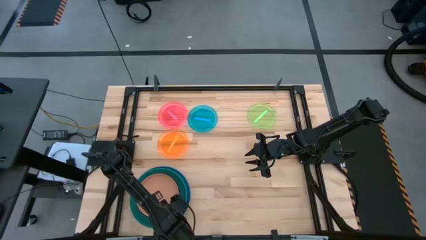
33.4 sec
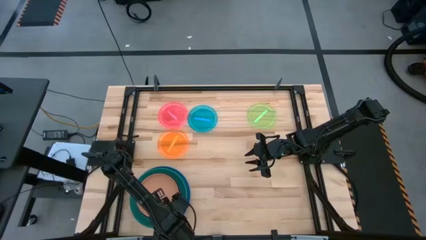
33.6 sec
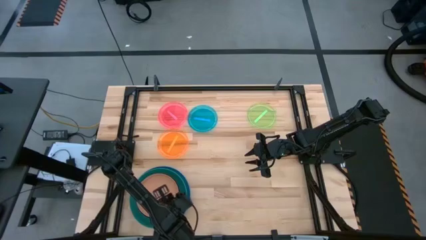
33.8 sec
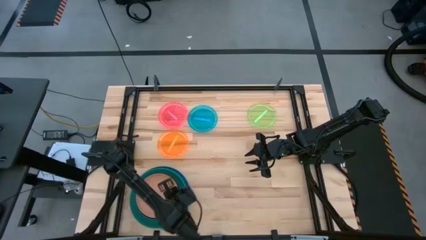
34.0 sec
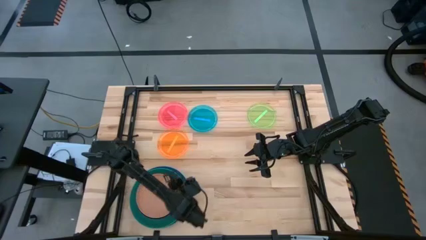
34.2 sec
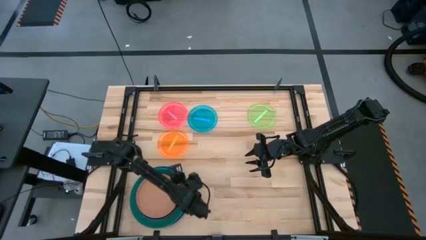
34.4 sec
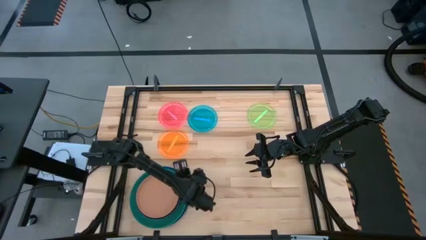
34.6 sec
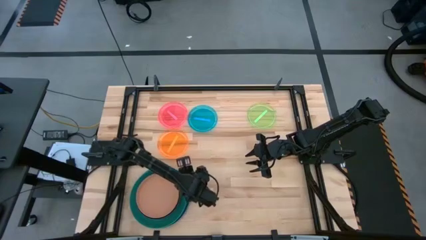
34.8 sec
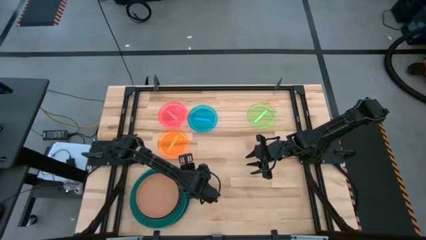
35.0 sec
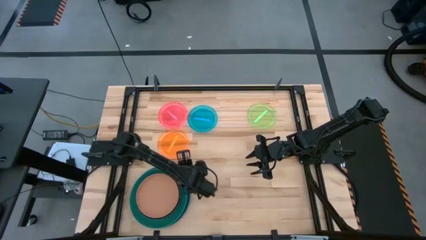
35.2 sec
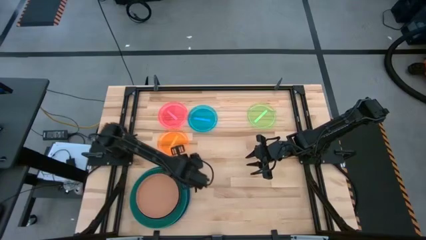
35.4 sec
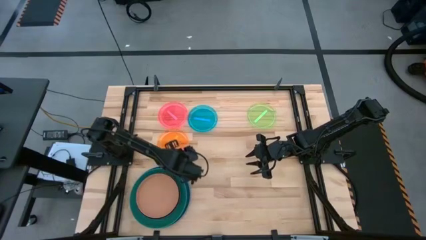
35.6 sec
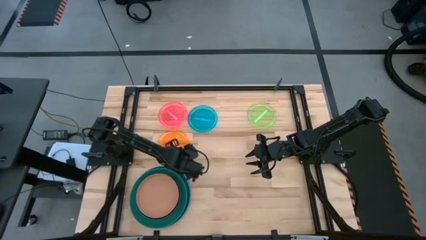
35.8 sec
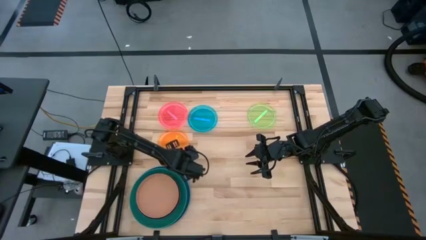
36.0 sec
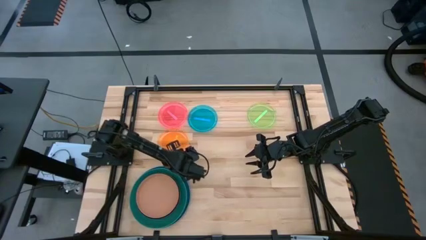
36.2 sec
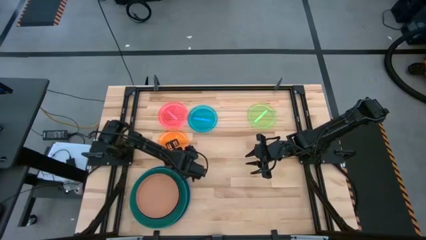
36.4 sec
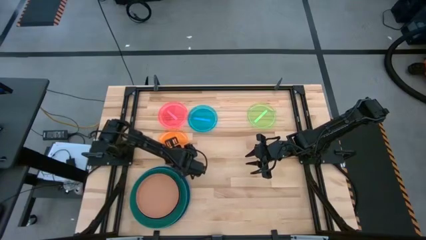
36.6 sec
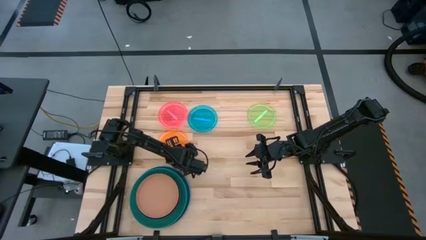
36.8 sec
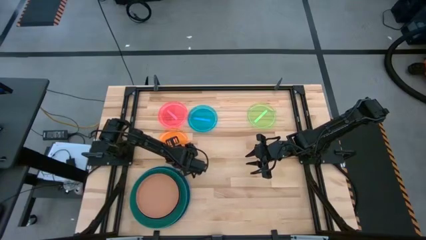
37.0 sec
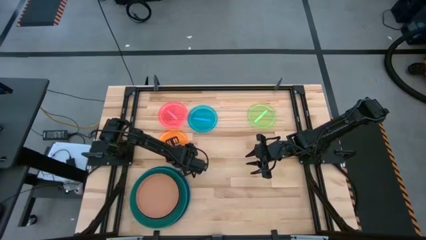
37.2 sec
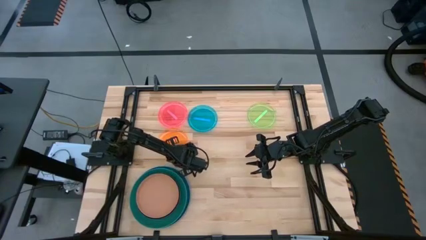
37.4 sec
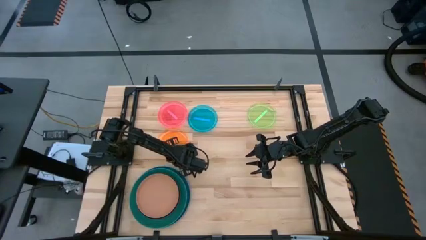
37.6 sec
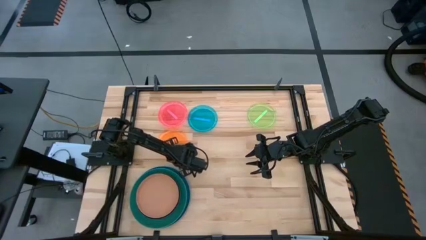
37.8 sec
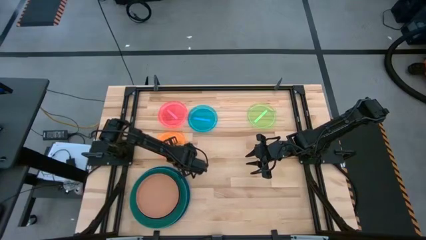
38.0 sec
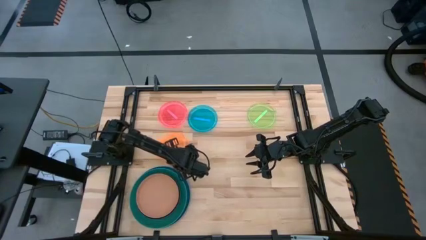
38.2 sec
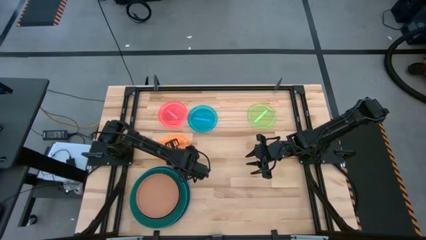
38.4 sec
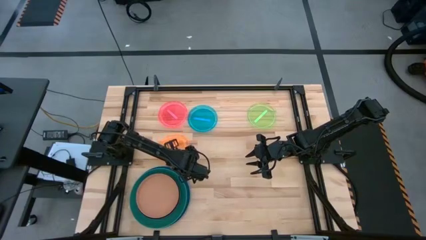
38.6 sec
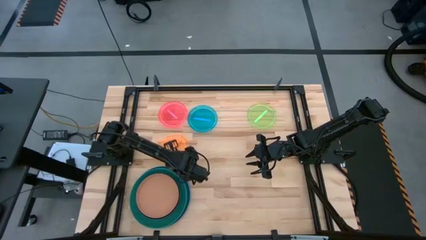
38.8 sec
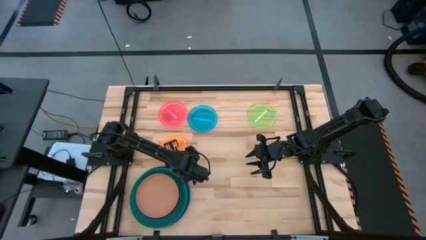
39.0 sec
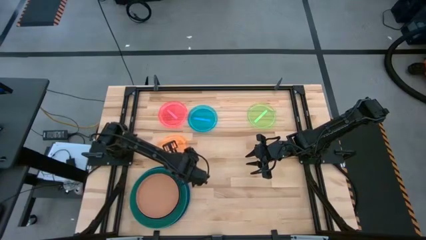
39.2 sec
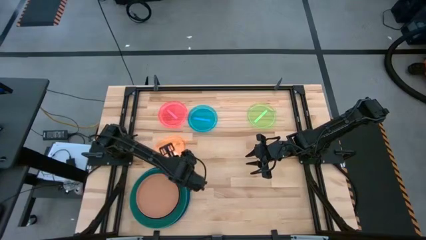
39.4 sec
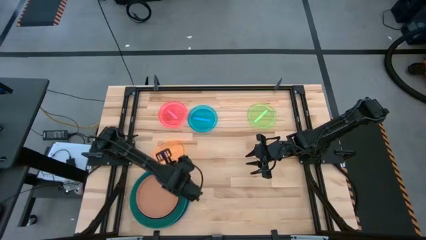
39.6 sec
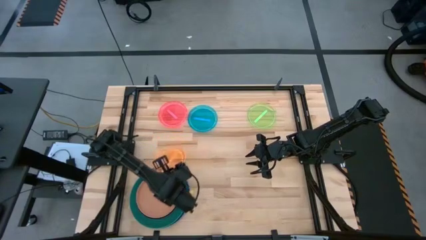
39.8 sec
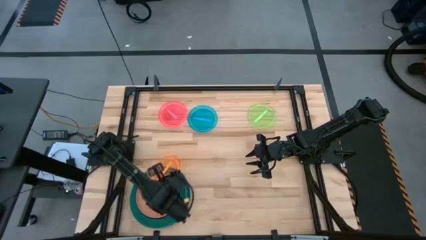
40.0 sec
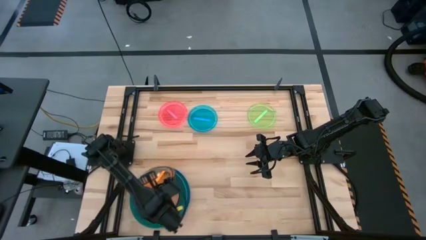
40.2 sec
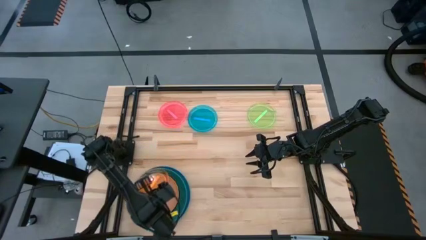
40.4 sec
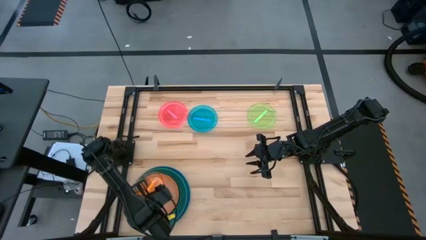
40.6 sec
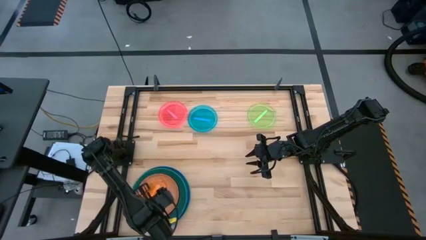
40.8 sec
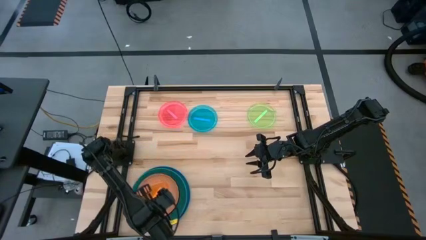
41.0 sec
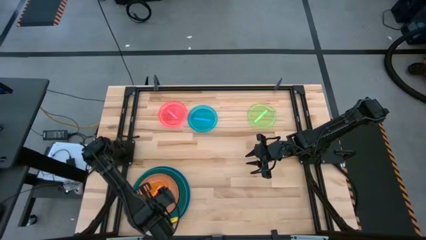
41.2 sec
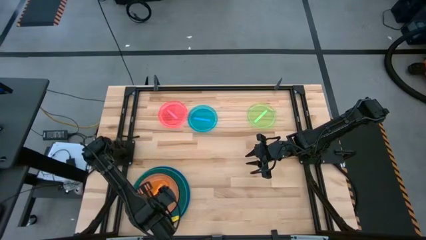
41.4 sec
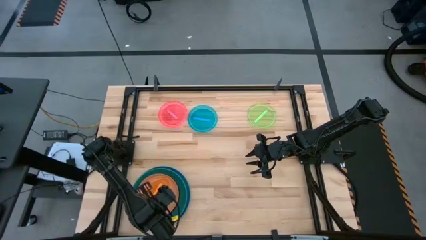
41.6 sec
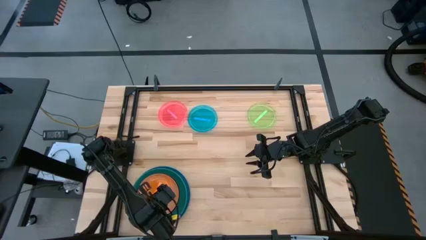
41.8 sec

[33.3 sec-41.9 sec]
Task: Stack plastic plates
Stack the orange plate on top of the light orange plate

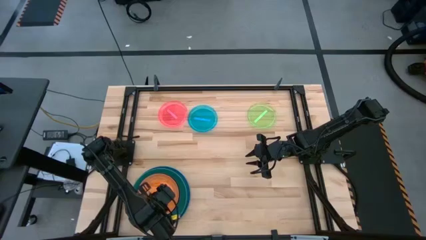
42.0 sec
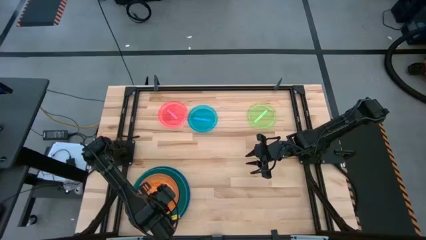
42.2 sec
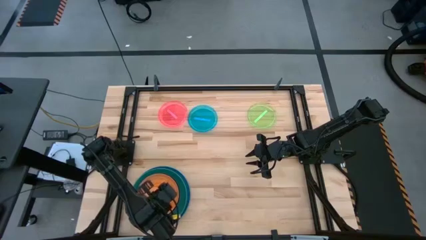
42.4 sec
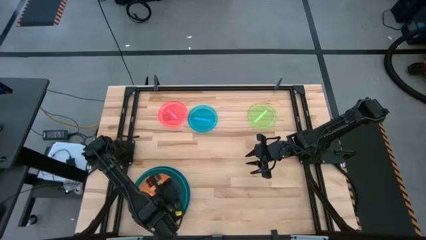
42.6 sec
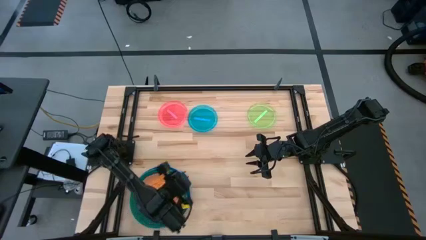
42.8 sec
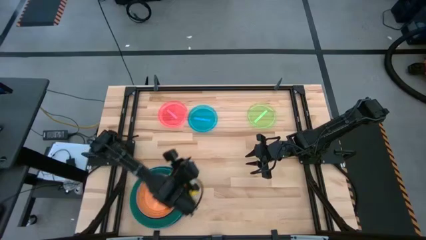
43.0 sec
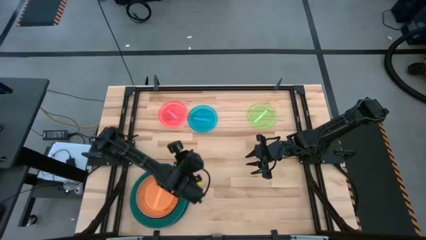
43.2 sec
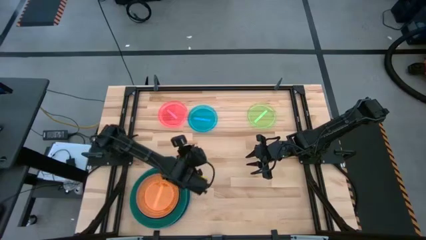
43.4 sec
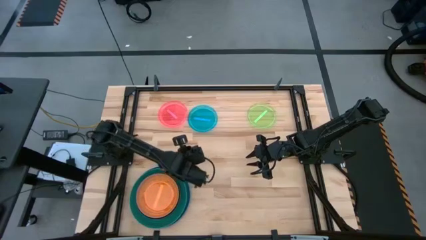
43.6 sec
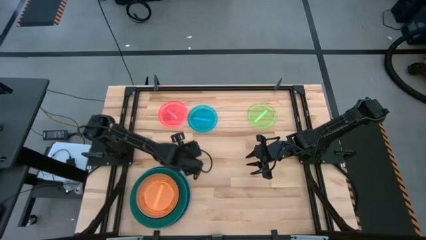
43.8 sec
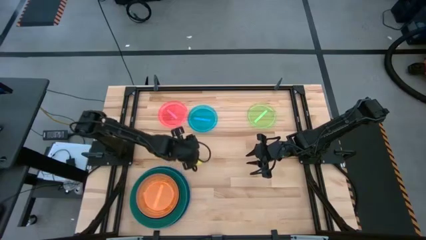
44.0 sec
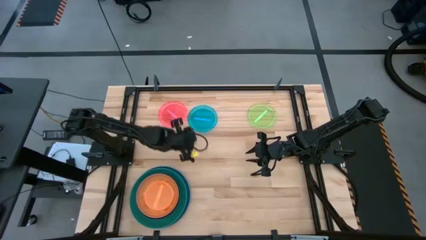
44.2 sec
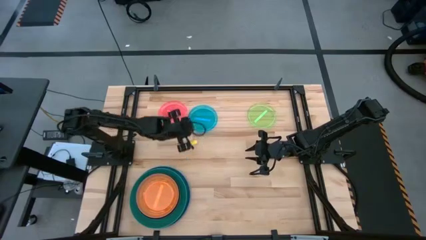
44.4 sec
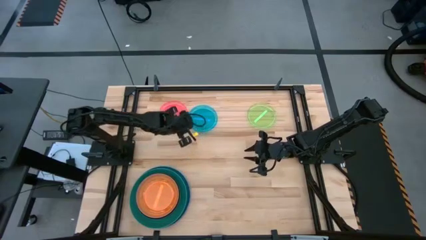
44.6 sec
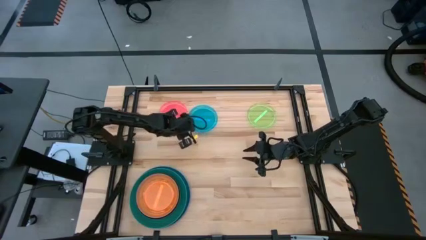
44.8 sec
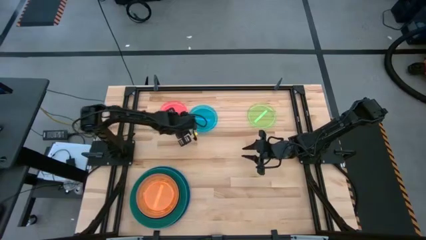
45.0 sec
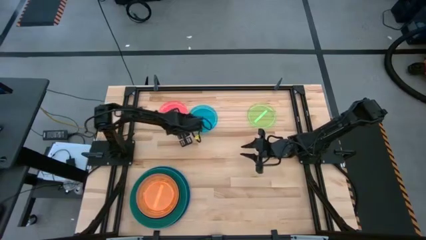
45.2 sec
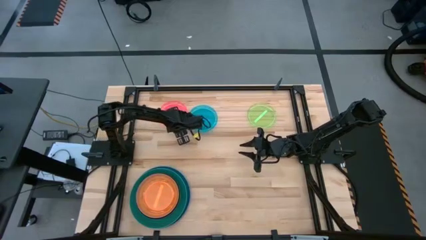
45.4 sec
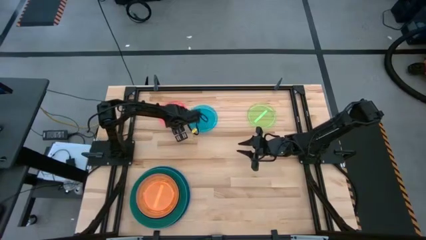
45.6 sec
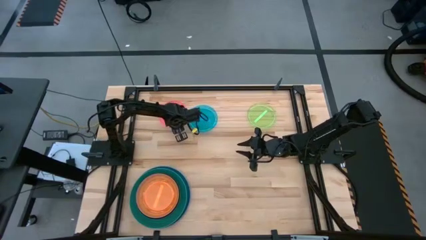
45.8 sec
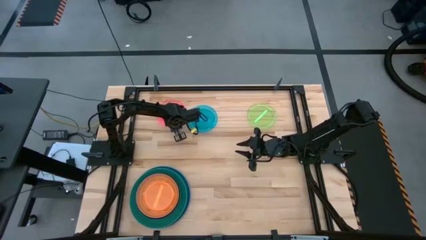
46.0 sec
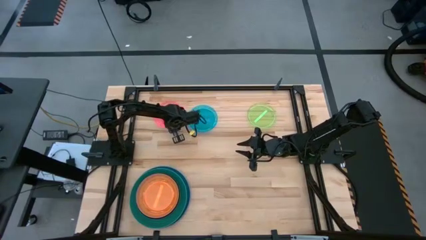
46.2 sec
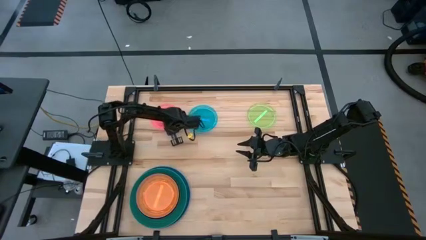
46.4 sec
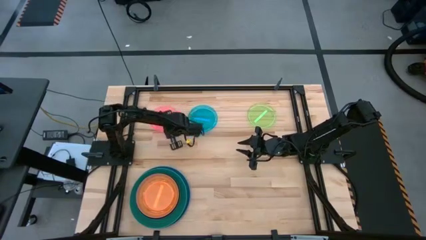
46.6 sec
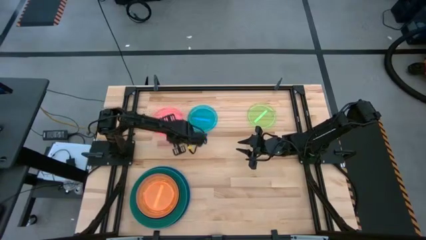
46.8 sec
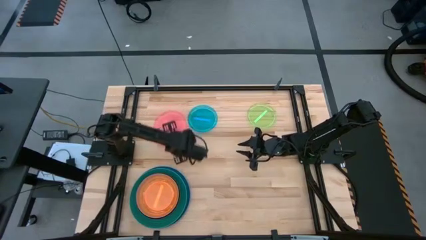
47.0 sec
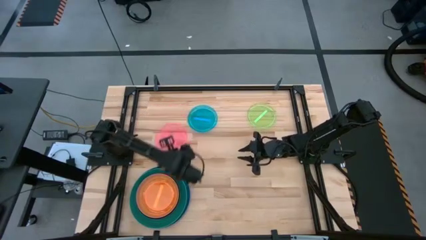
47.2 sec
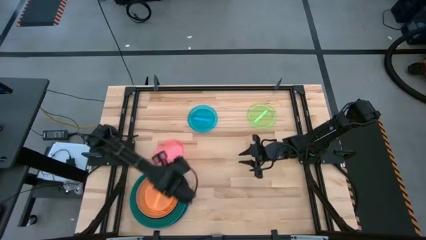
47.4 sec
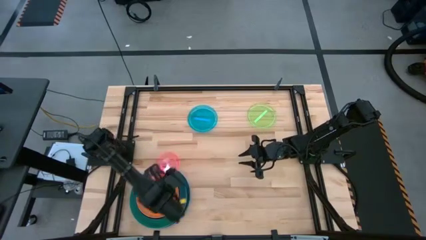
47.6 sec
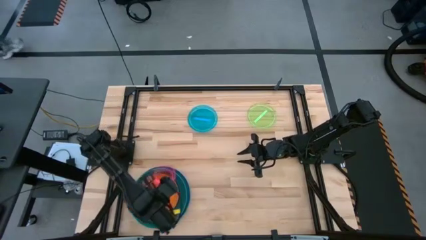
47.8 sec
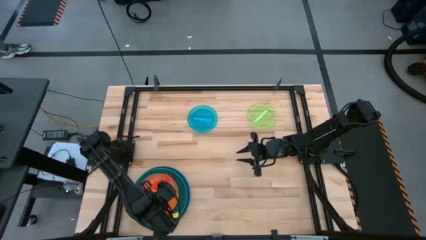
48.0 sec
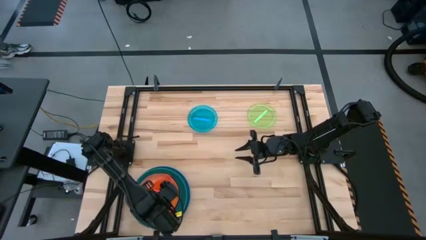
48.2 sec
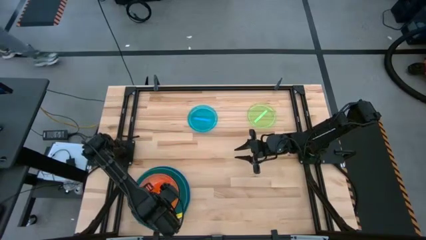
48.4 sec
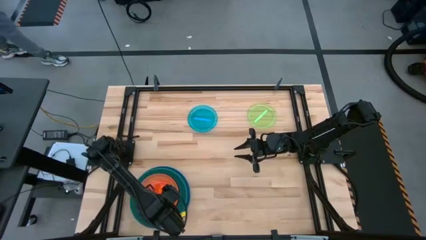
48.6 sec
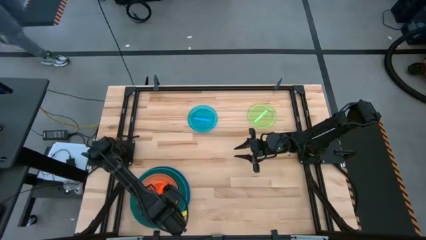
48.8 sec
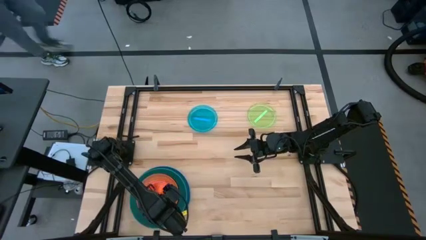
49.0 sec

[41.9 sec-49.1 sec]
Stack the pink plate on top of the orange plate
